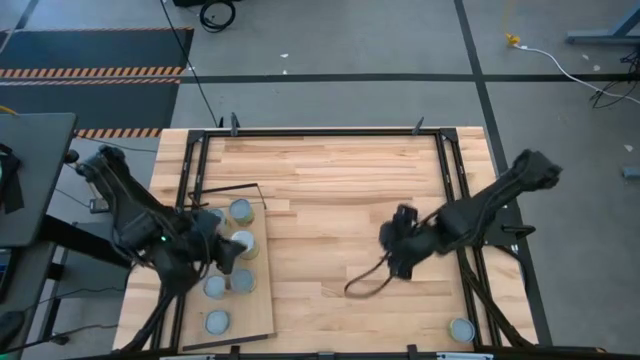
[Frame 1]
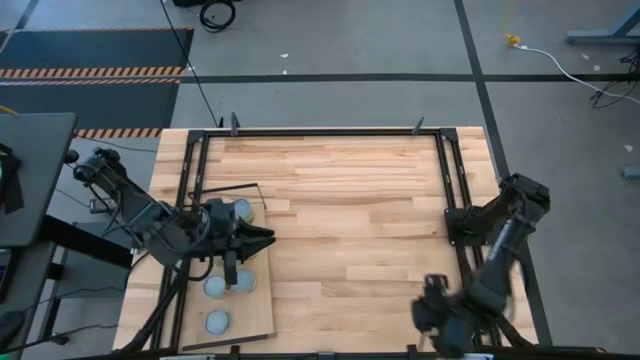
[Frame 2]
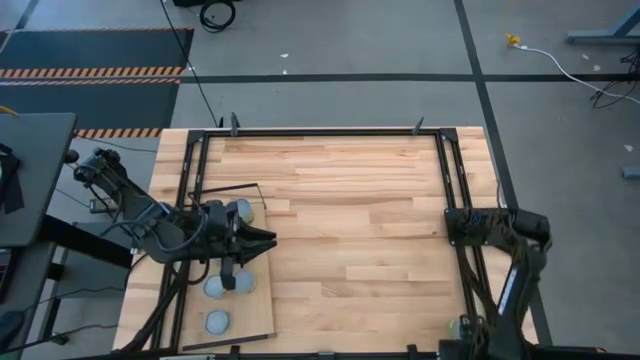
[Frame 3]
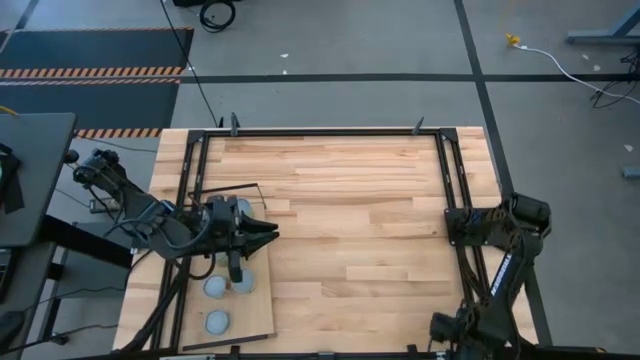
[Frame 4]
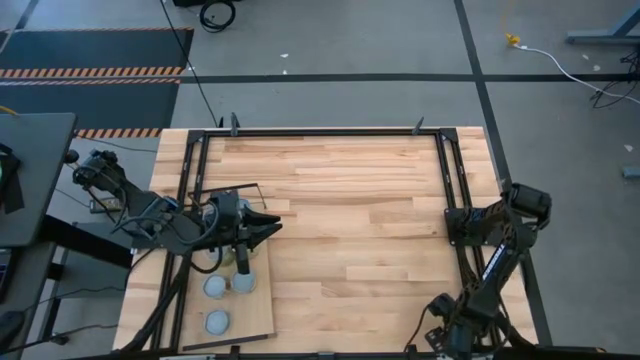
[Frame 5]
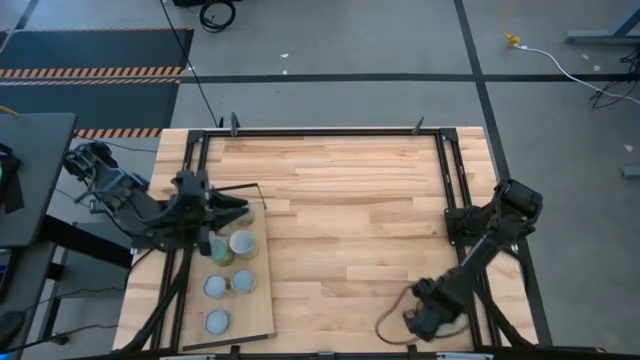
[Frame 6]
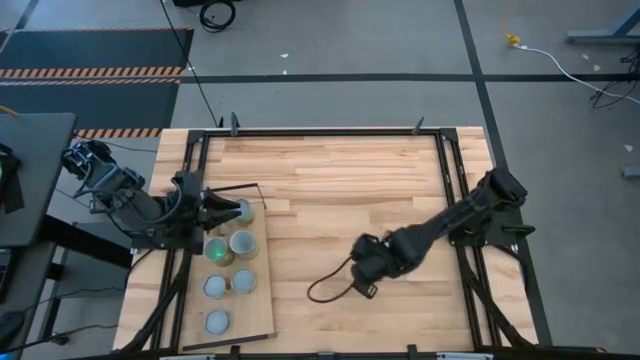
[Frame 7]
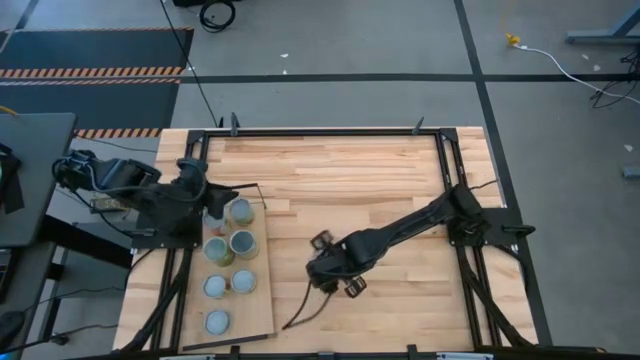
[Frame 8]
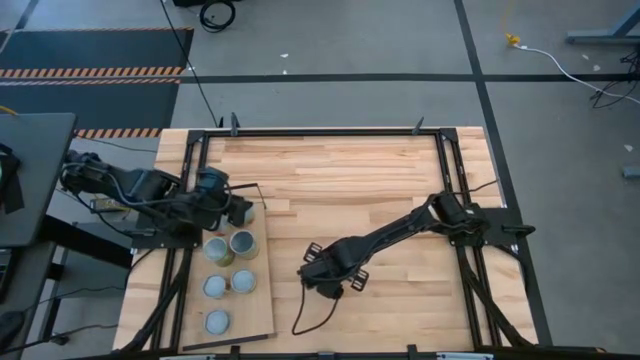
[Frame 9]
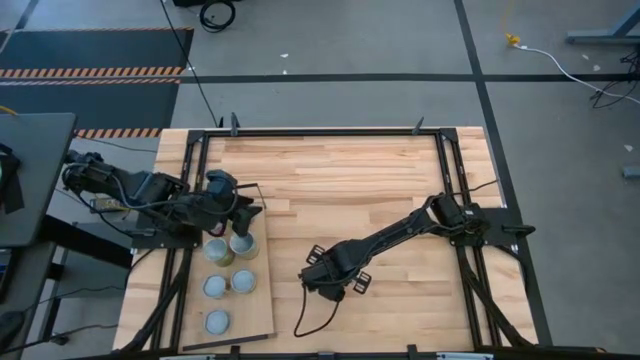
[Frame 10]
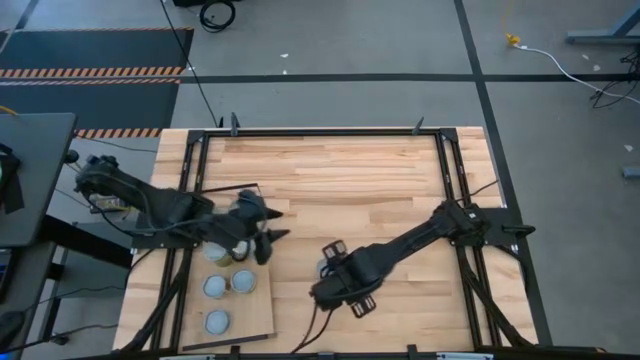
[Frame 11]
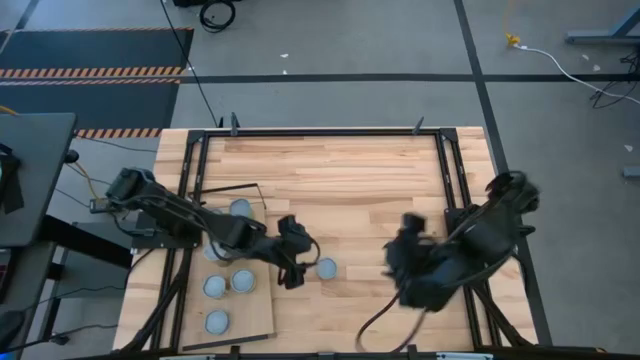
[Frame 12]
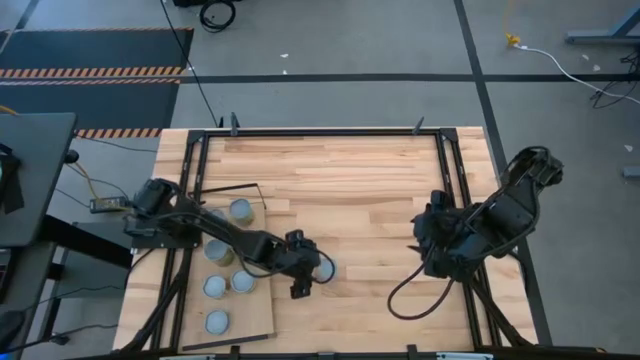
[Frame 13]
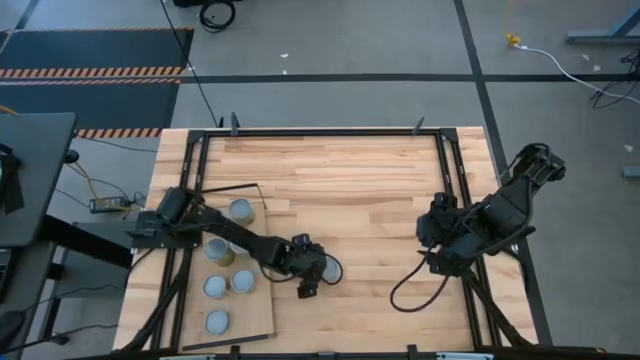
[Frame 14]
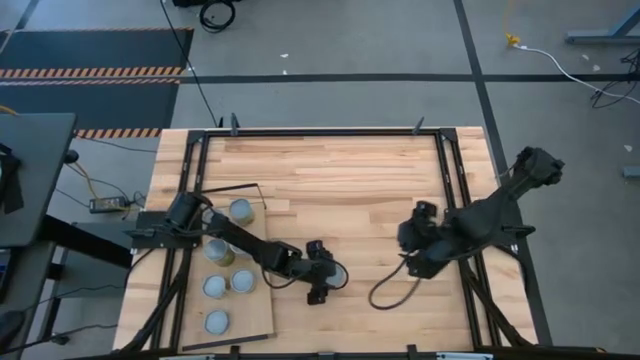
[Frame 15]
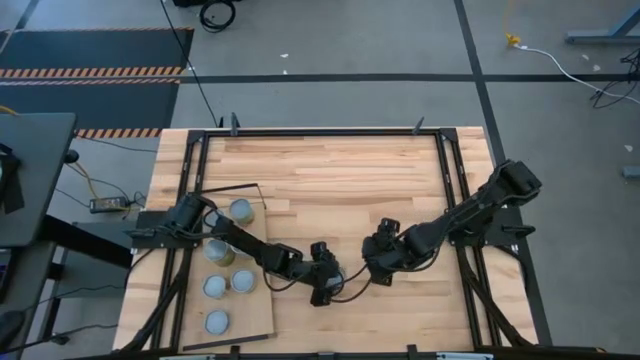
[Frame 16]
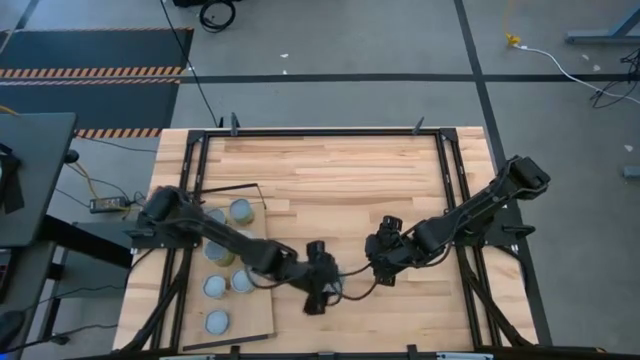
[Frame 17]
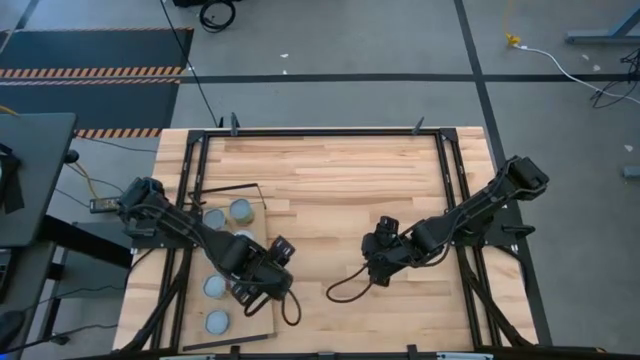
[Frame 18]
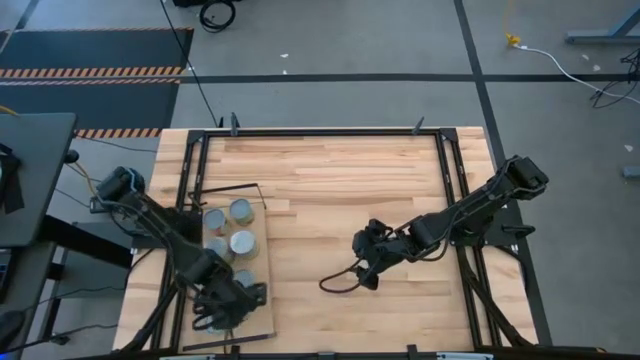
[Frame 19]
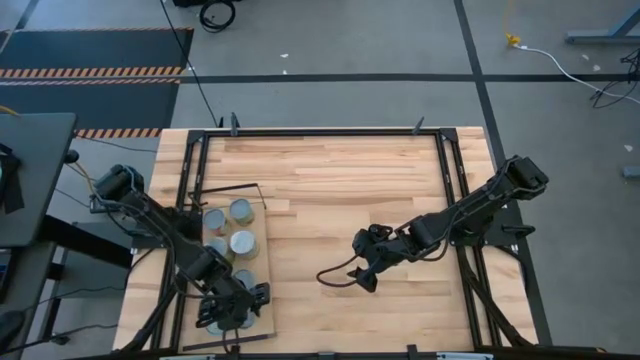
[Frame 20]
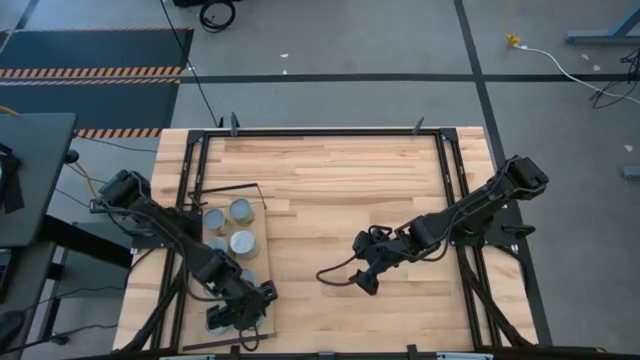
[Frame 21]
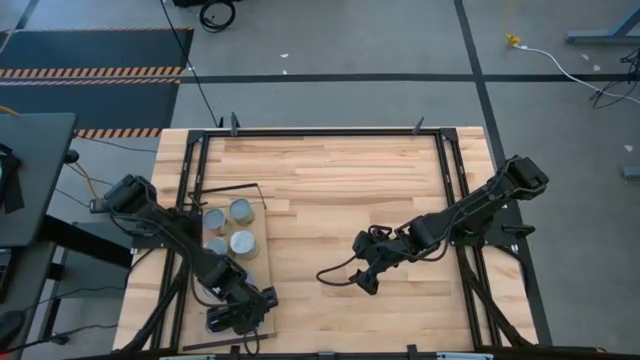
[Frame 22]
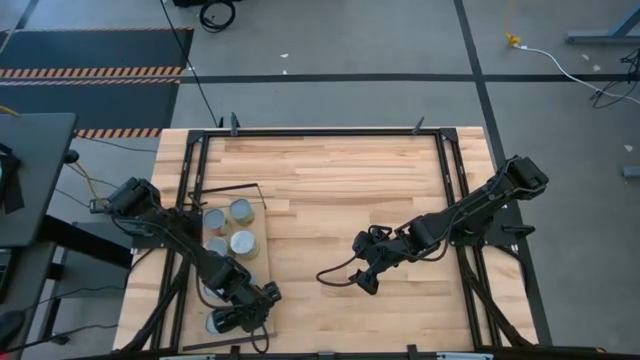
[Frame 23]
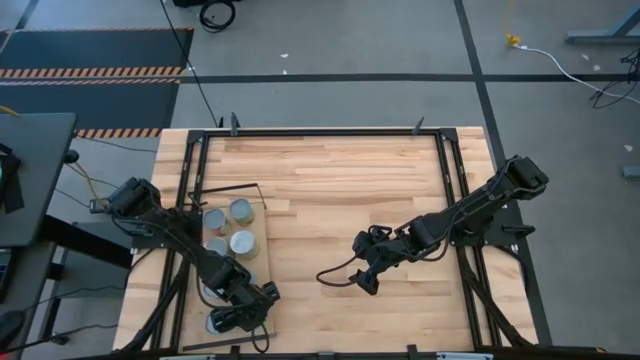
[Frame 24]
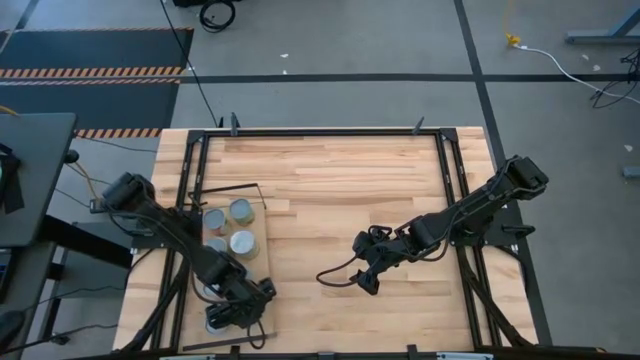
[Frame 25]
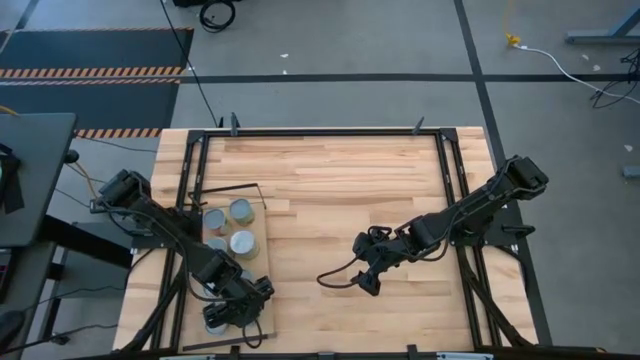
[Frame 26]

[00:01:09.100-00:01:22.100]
Task: Pick and place cans onto a shelf
Put the small yellow can on the shelf

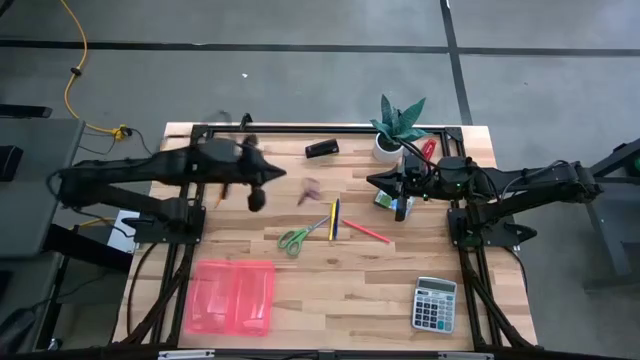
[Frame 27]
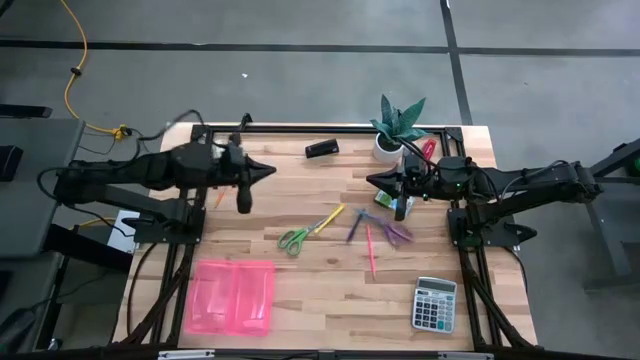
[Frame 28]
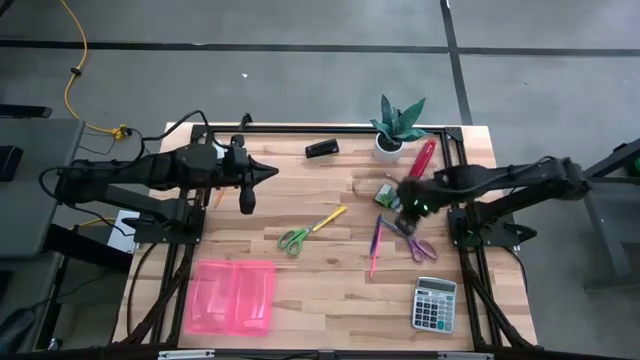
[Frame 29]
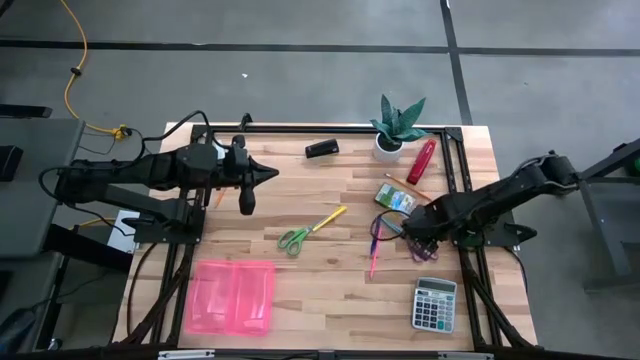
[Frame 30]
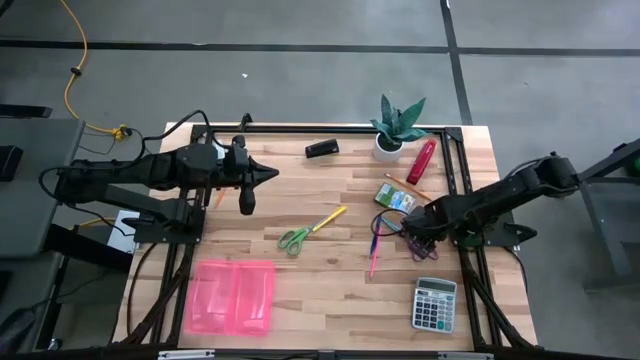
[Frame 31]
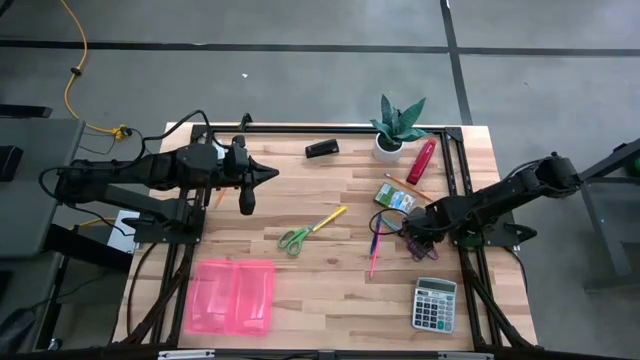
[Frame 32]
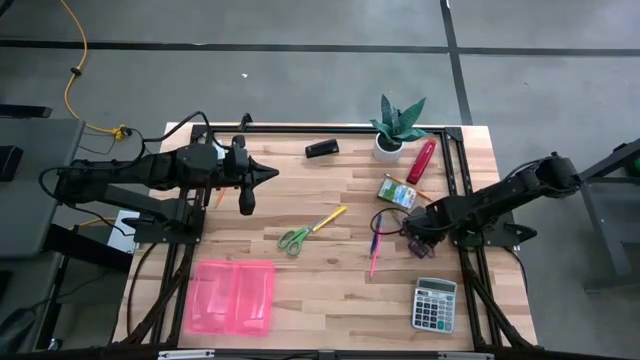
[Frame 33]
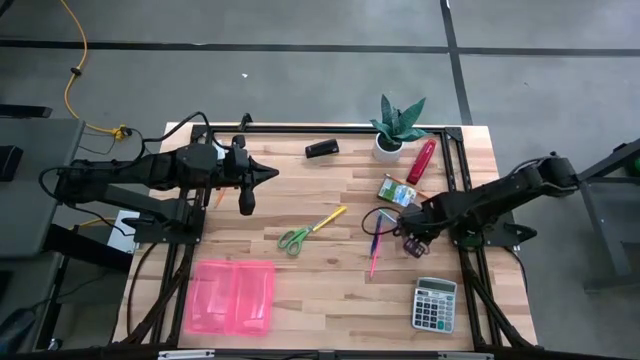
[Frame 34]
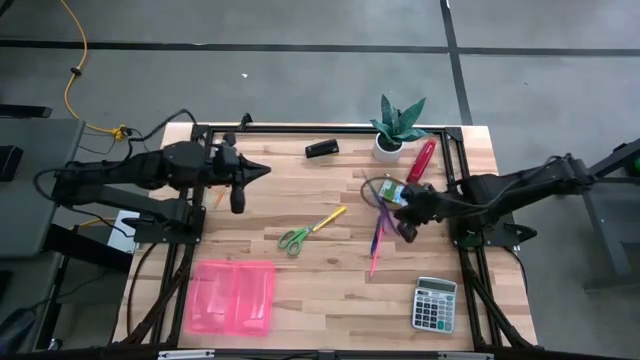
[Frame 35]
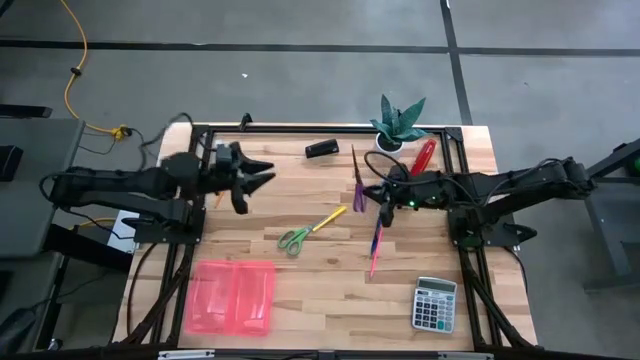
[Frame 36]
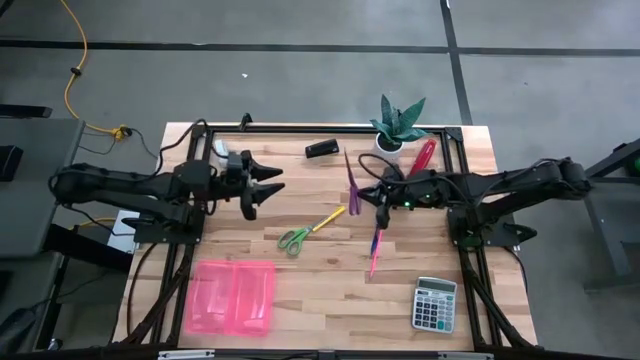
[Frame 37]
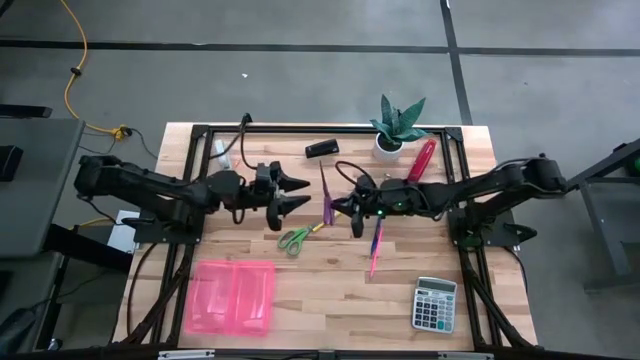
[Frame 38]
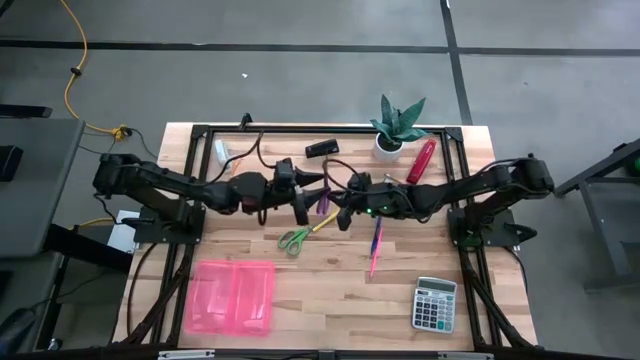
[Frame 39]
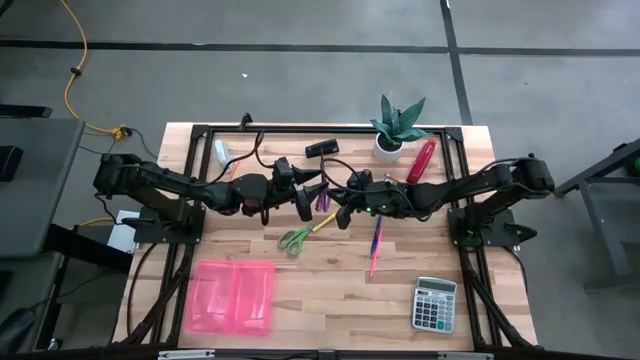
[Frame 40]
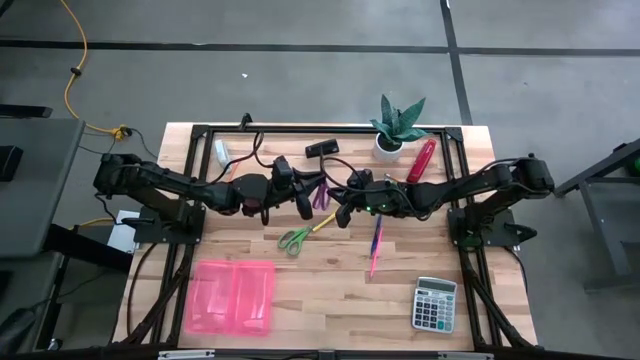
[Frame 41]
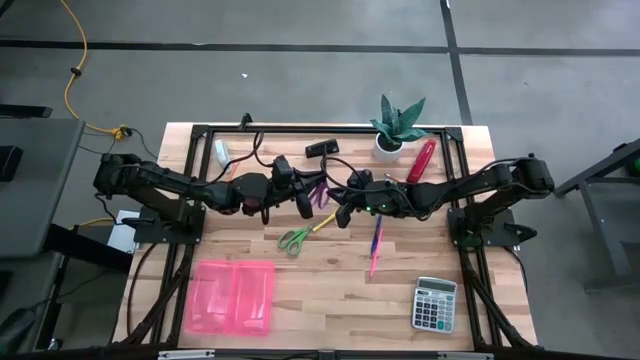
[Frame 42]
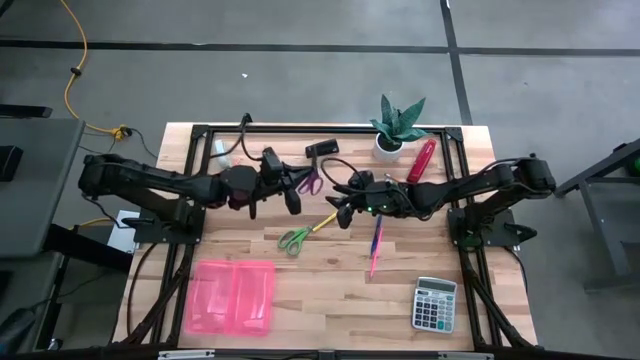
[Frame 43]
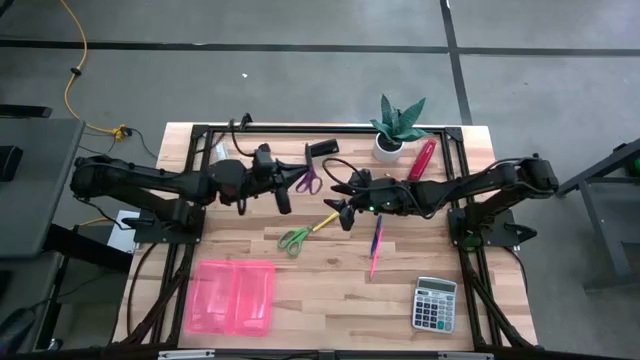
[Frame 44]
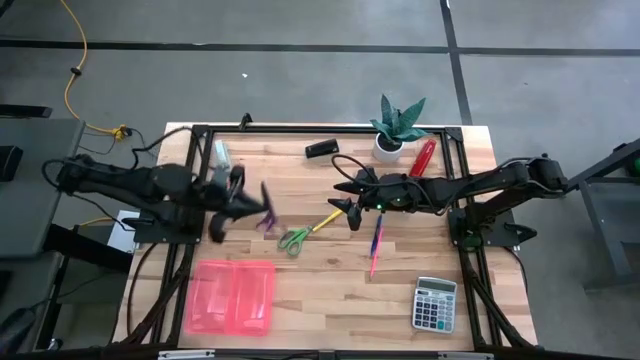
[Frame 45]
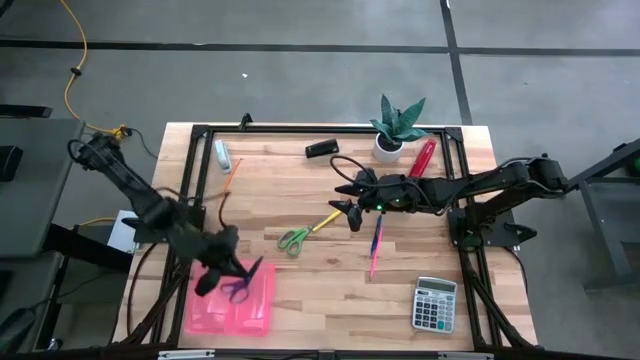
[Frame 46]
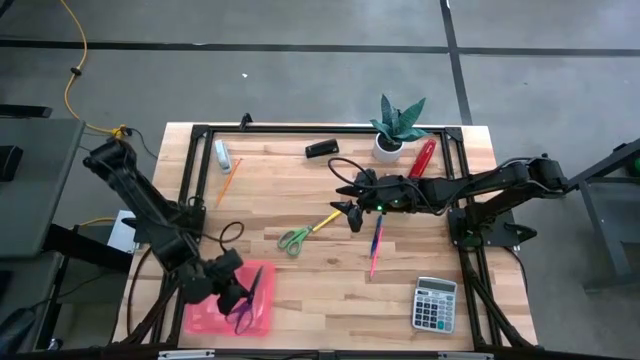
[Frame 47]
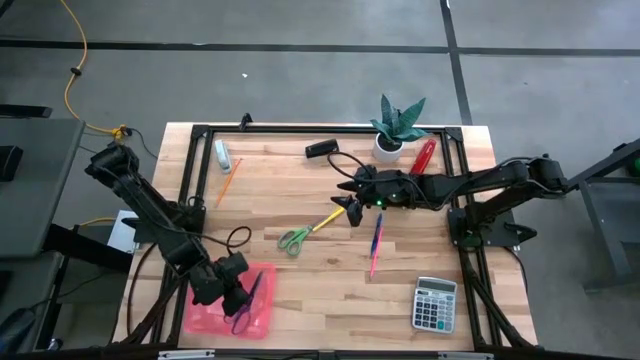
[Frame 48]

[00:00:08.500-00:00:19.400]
Task: Pack school essentials
Put the purple scissors into the supply box
